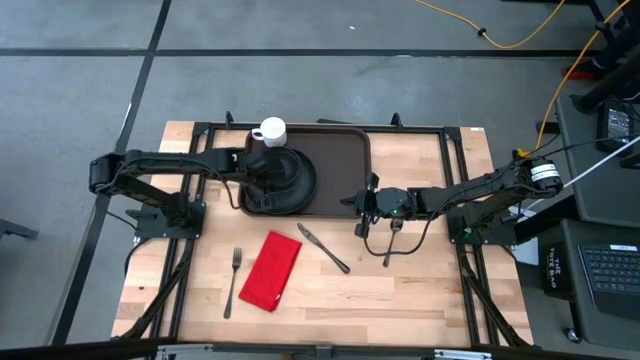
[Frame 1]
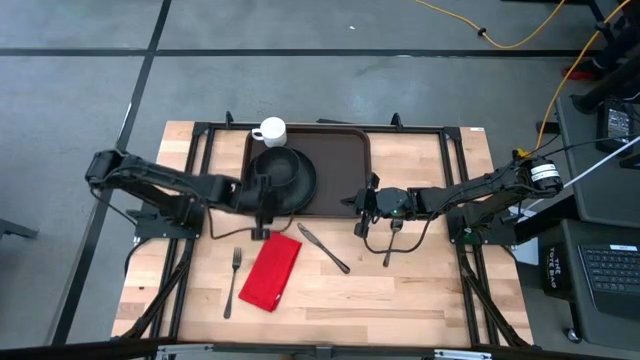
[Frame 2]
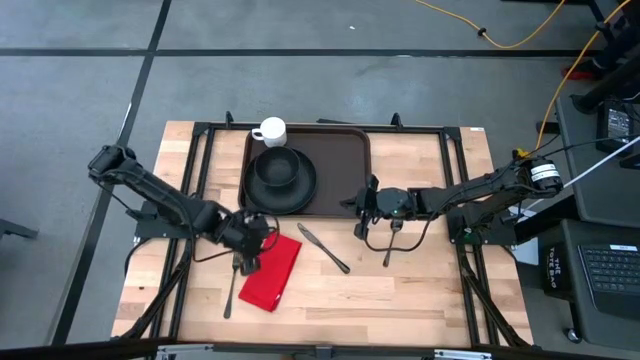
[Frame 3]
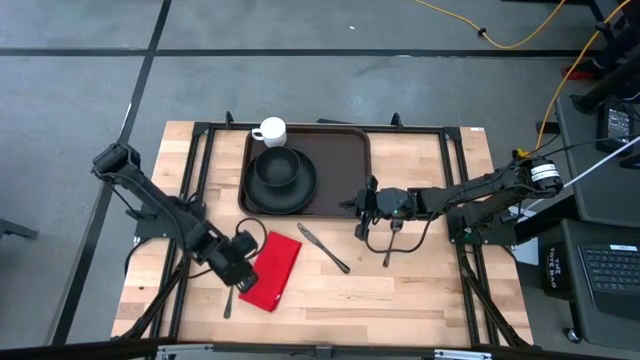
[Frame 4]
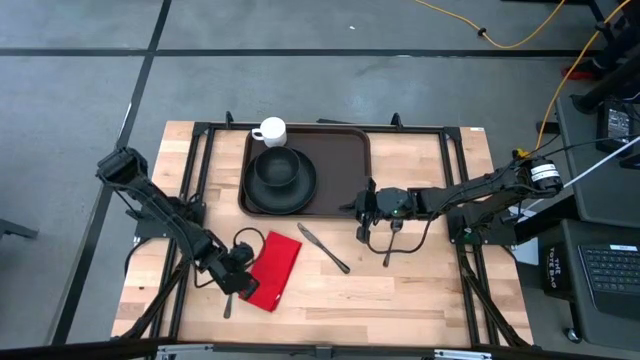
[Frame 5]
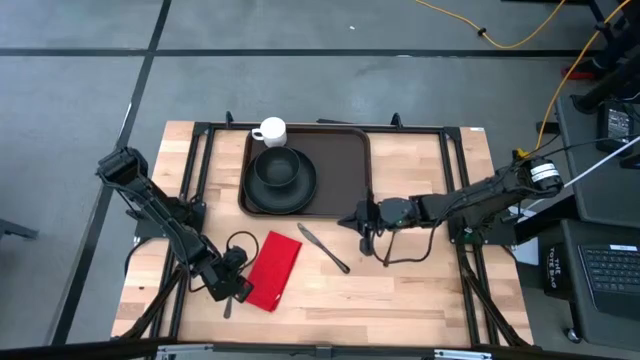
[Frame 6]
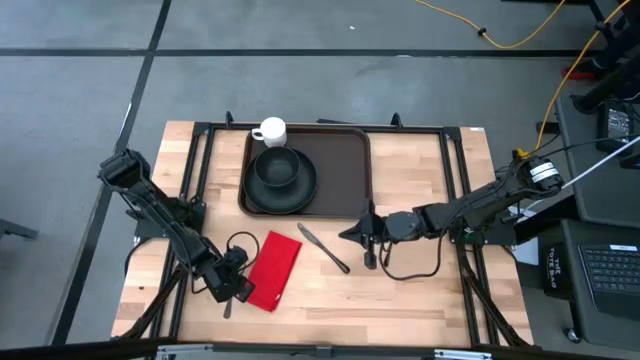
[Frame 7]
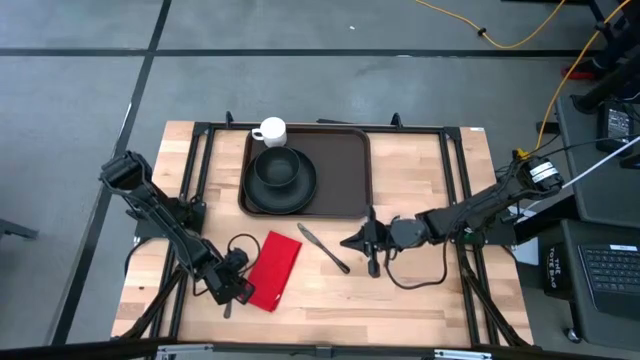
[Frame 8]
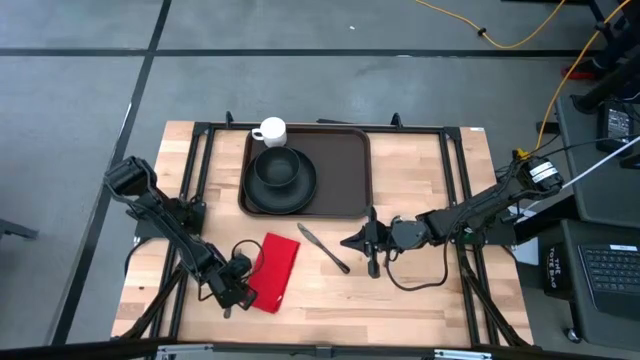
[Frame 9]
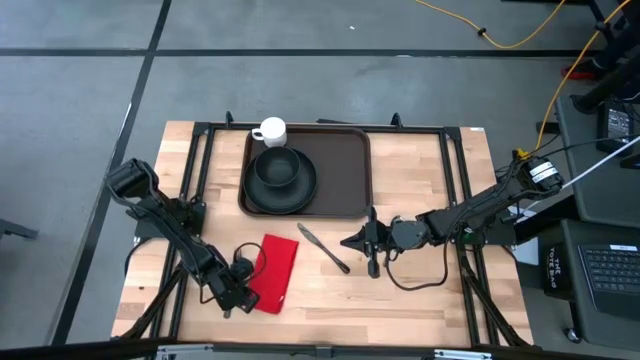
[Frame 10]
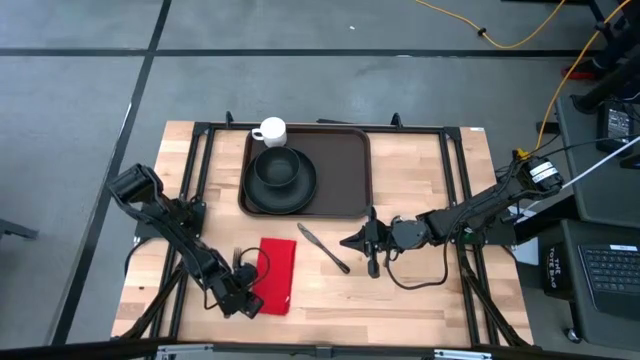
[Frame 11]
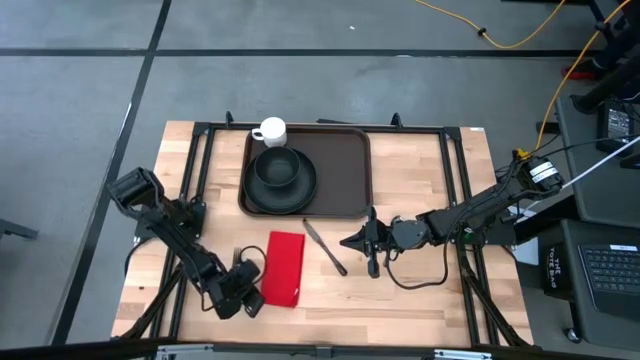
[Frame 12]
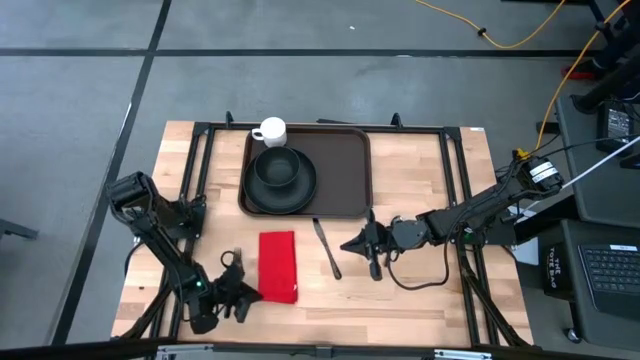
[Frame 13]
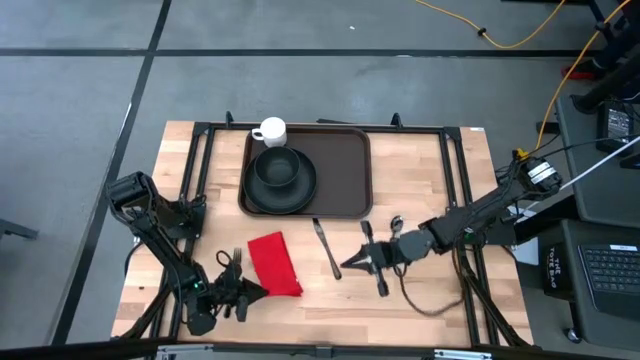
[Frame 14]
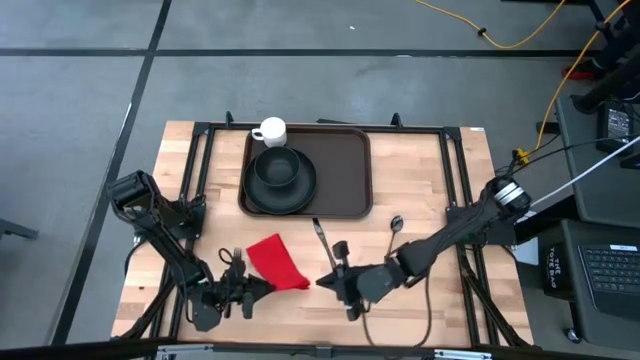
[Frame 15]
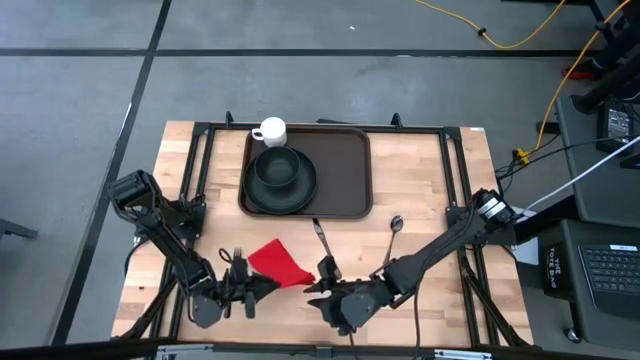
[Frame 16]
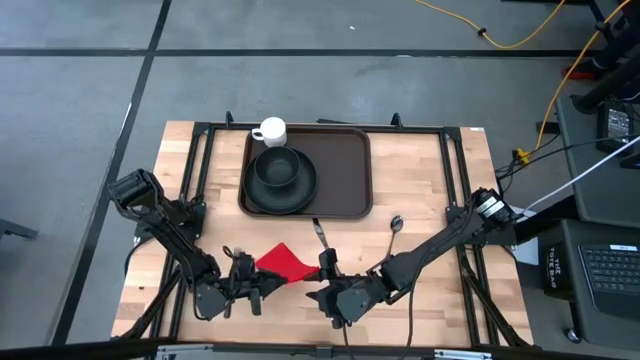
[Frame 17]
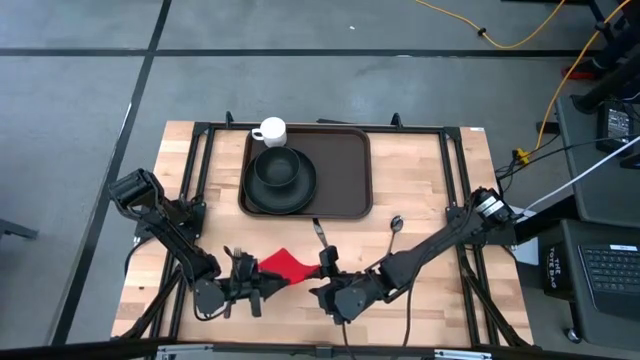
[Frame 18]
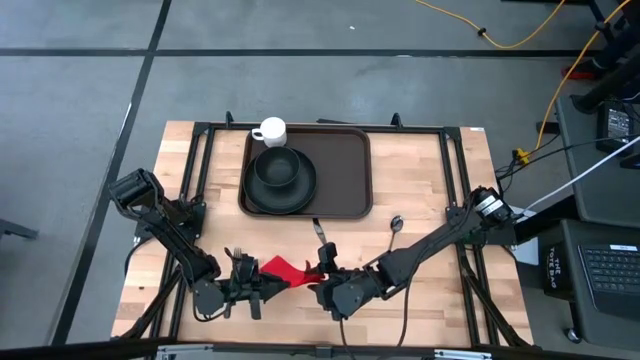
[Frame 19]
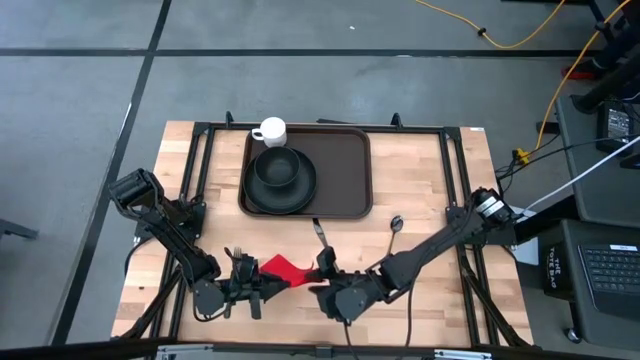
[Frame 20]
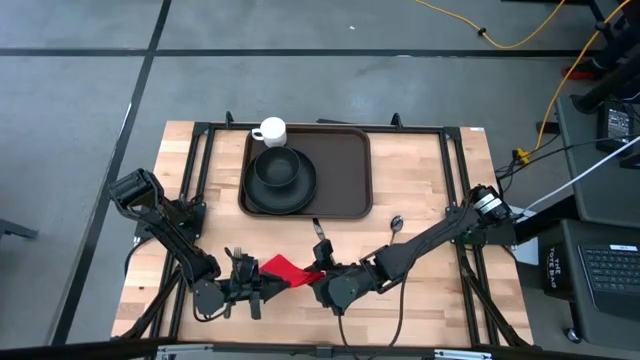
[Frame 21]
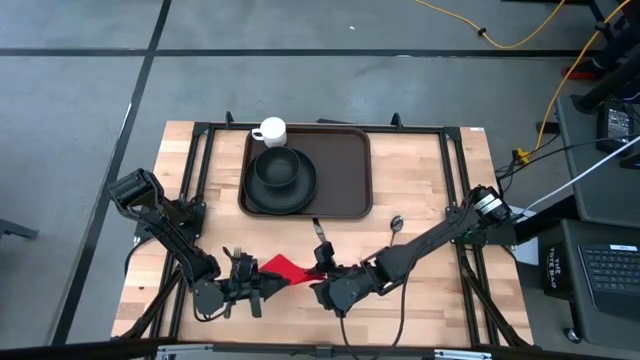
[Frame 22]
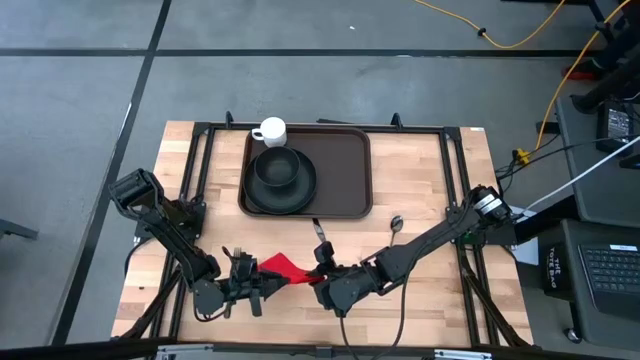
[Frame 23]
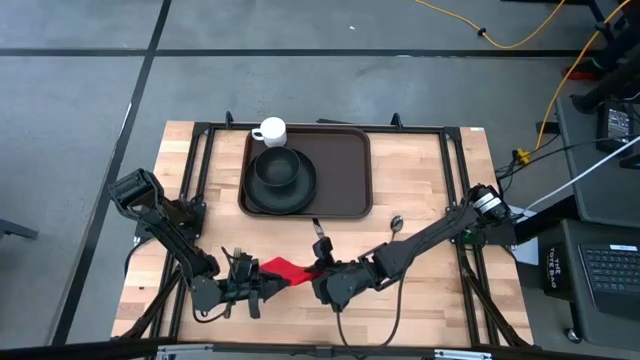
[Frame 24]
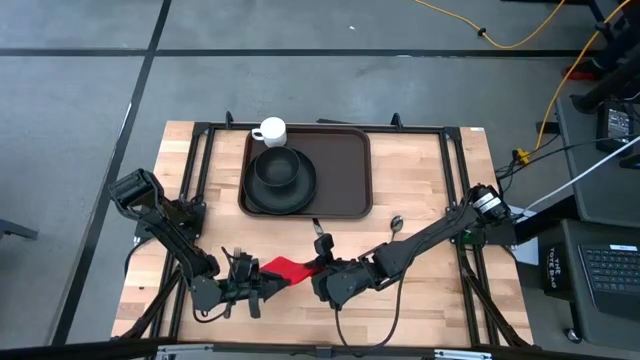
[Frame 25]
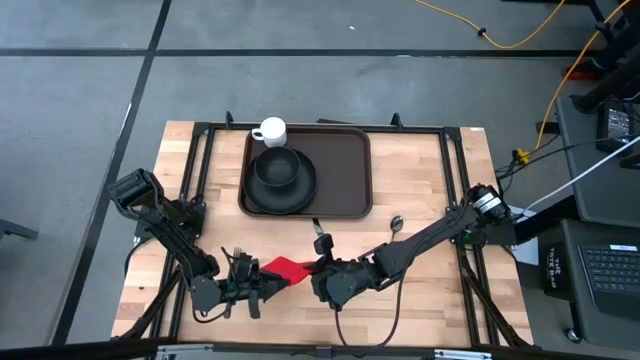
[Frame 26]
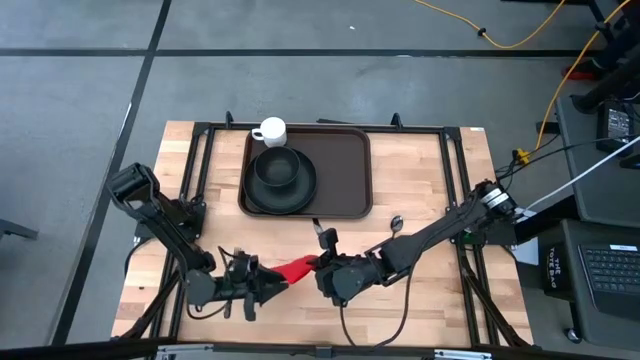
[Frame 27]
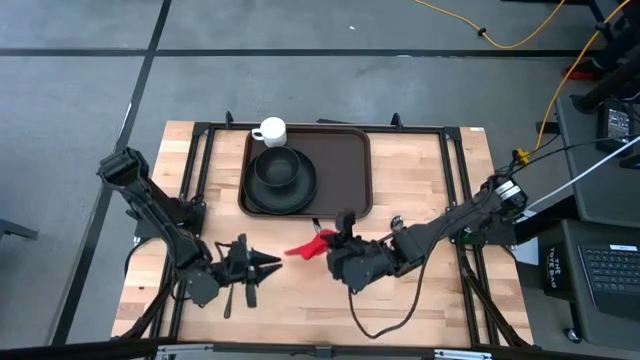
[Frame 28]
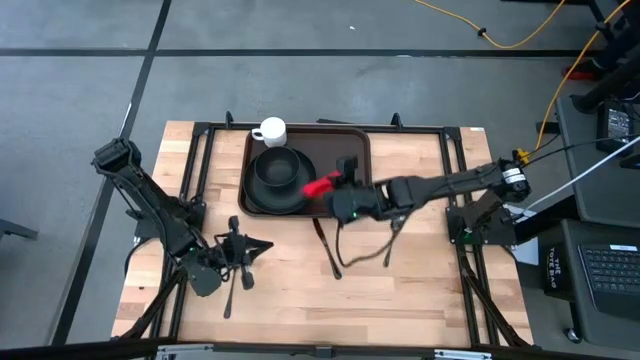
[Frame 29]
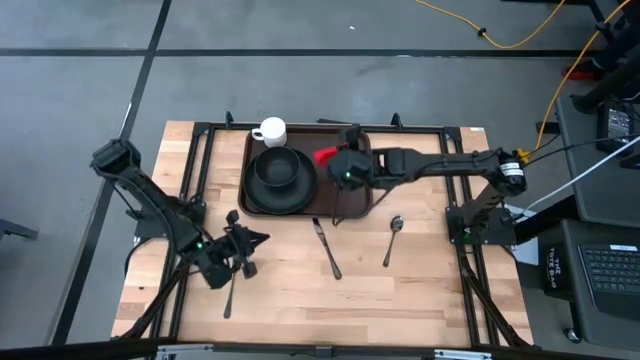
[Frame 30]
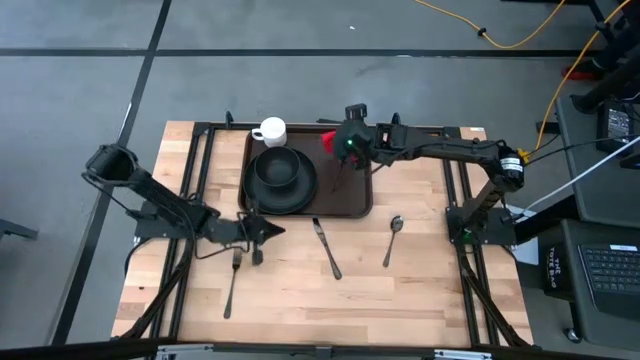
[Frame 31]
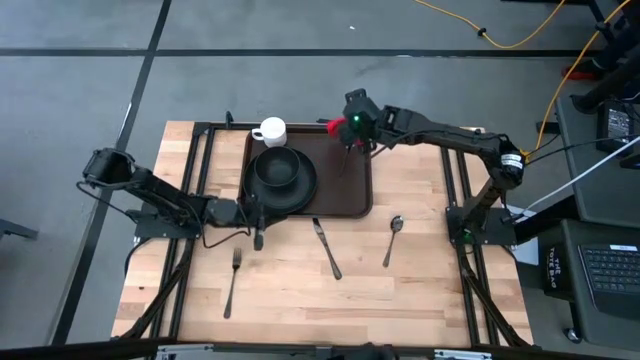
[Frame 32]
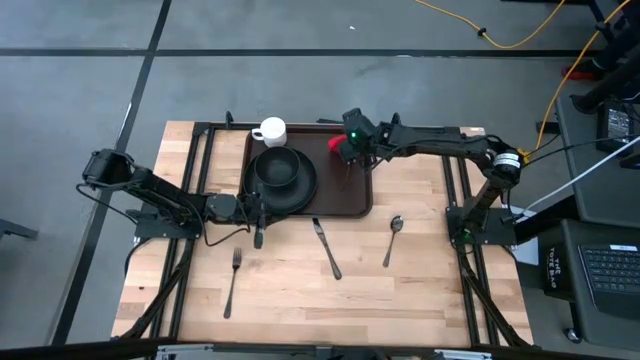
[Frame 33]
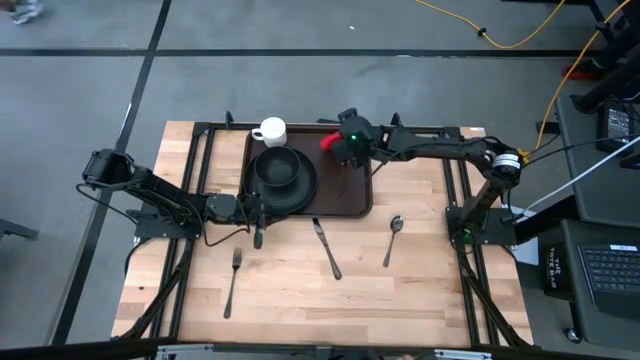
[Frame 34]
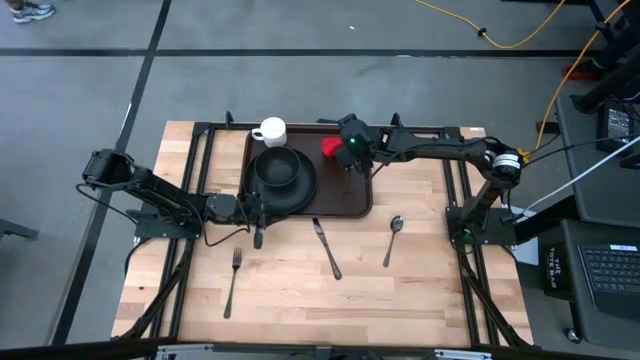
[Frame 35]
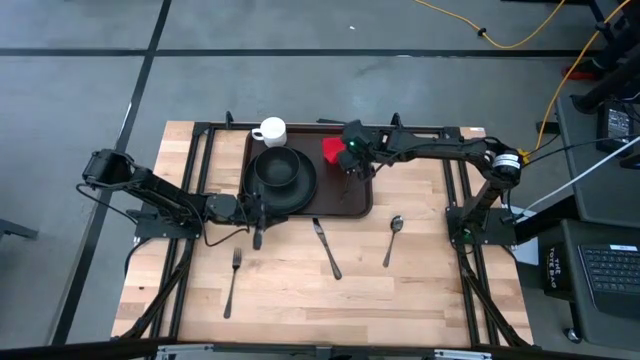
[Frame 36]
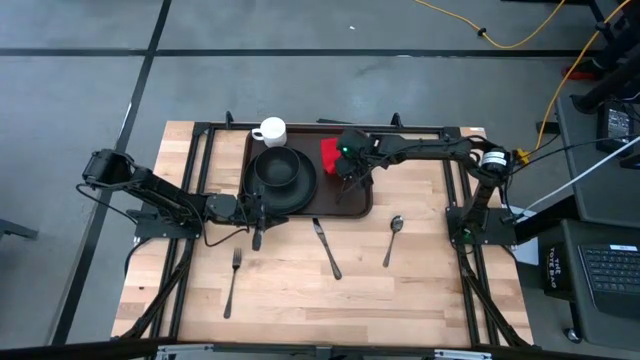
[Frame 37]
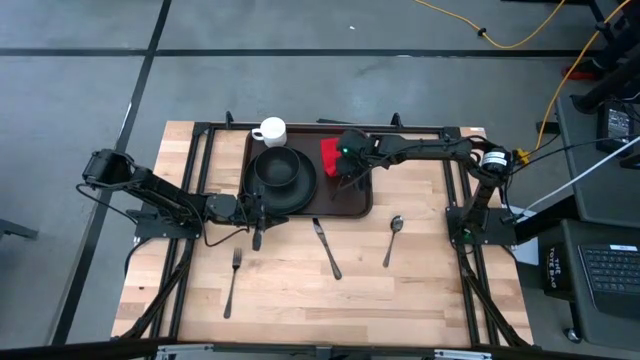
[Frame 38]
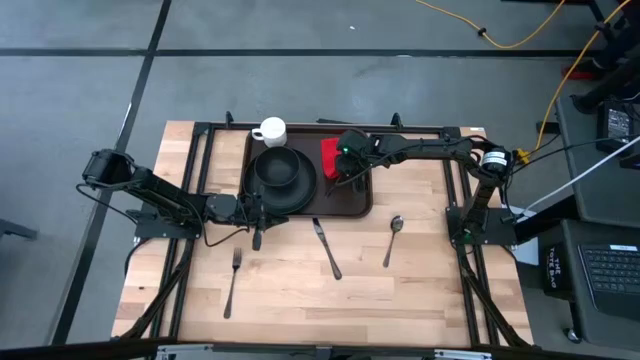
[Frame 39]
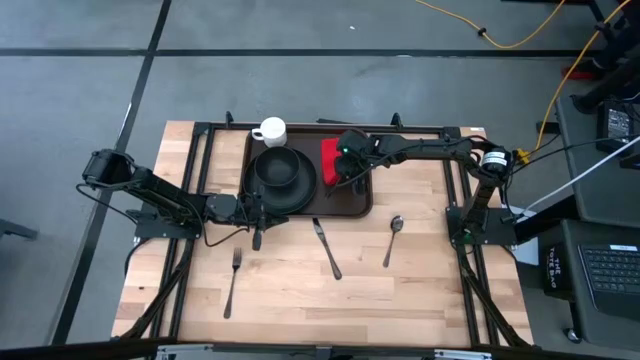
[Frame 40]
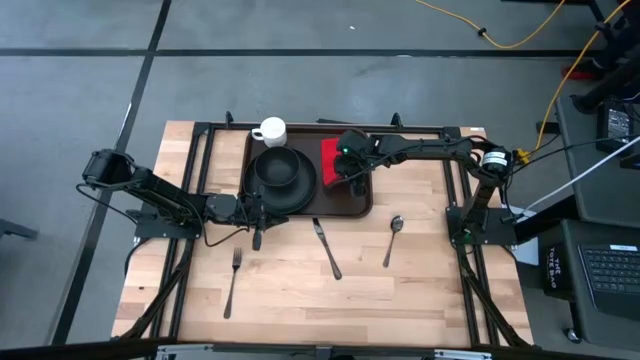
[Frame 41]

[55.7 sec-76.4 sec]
Task: Set up tray
Put the red napkin on the brown tray to the right of the black plate

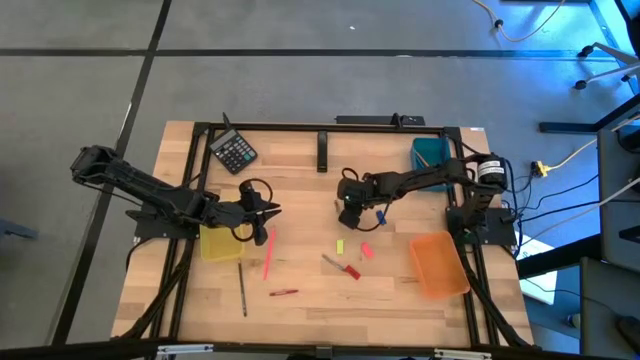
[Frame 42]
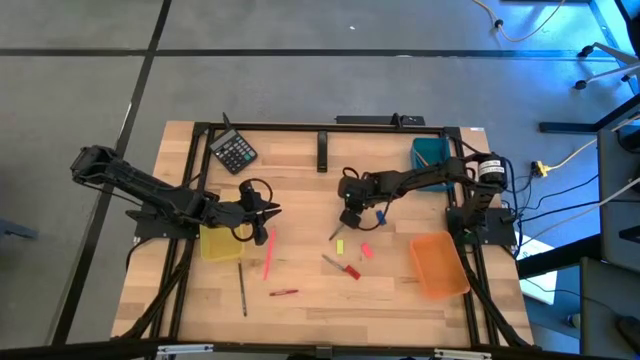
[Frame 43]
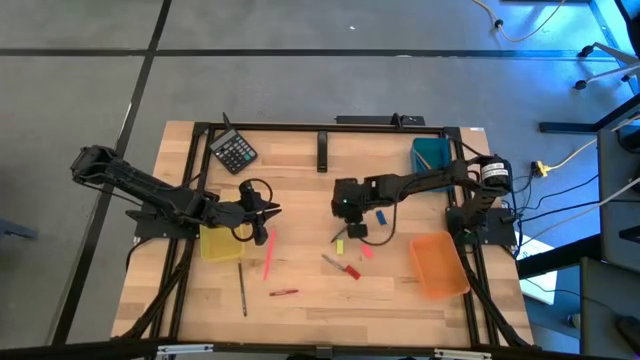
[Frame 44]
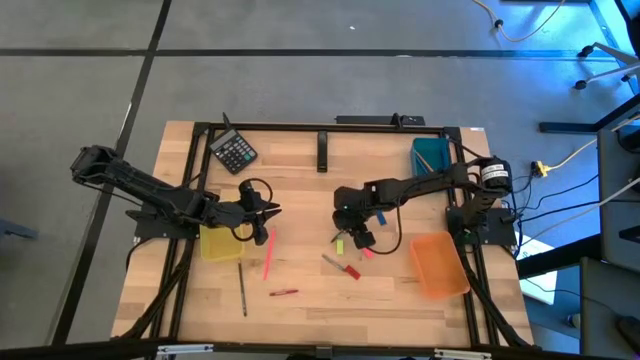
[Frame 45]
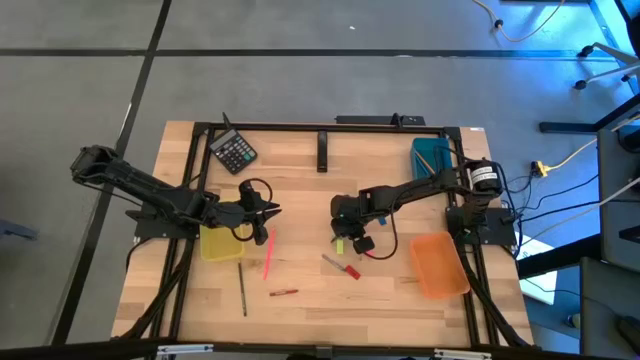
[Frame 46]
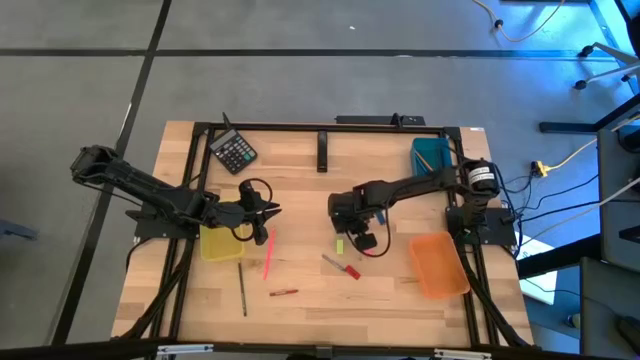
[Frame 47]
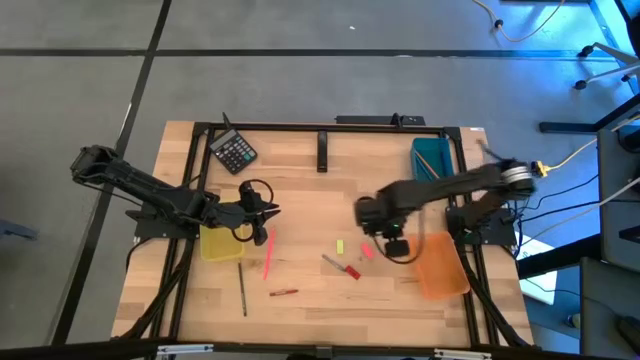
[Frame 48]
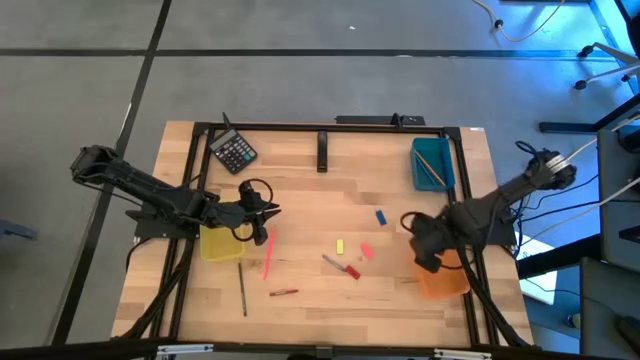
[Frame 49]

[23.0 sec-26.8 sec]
Task: Sort crayons/erasers/pens/pencils in bins
Put the green crayon into the orange bin
